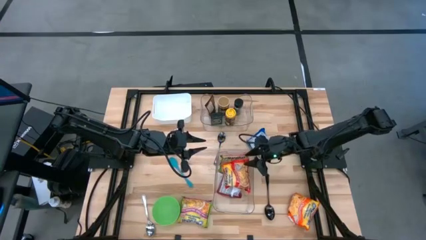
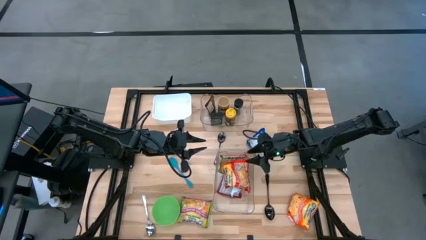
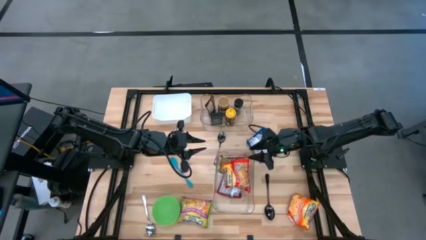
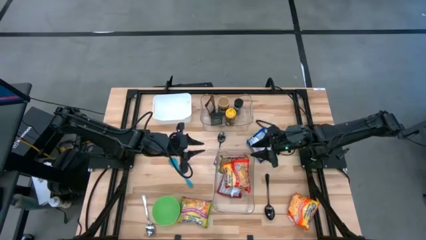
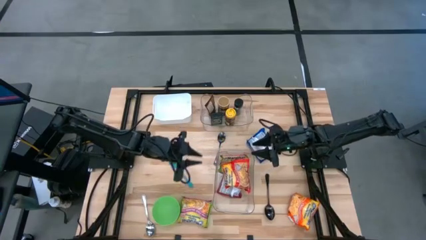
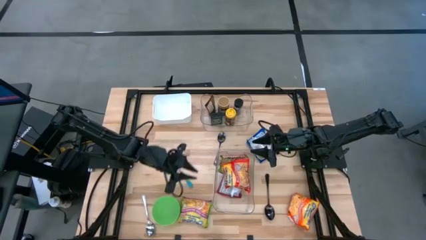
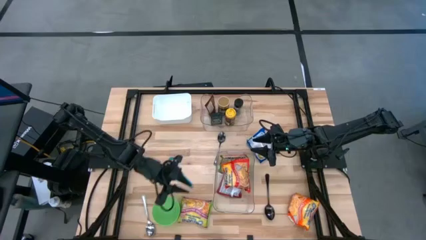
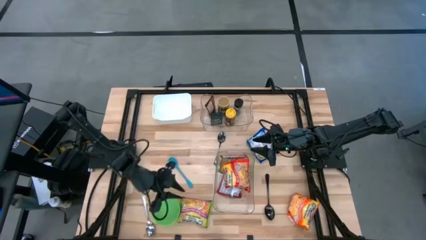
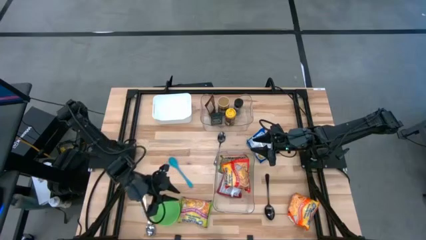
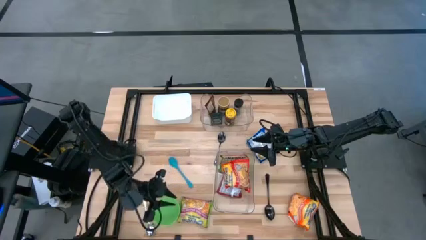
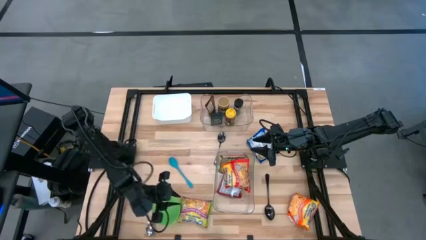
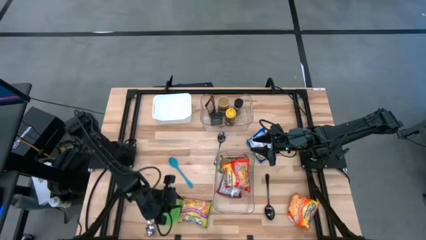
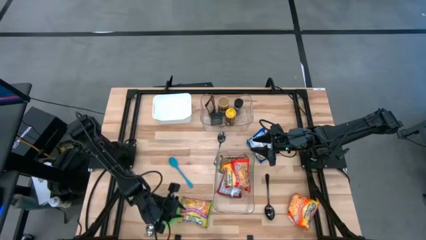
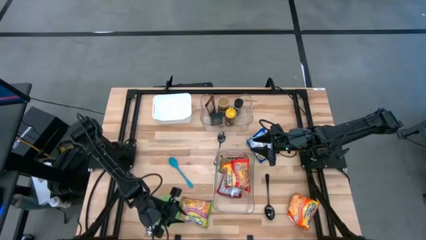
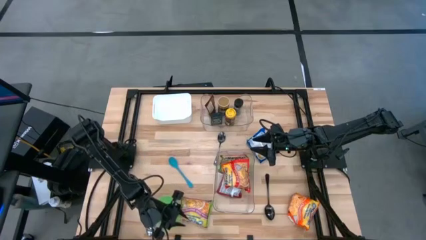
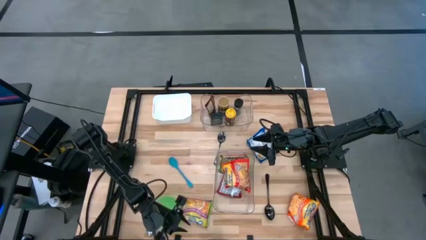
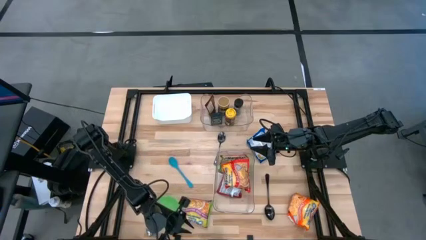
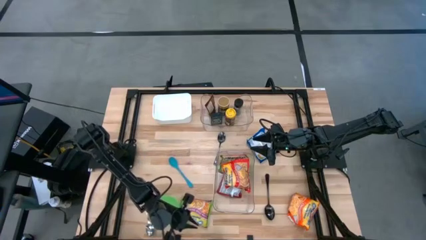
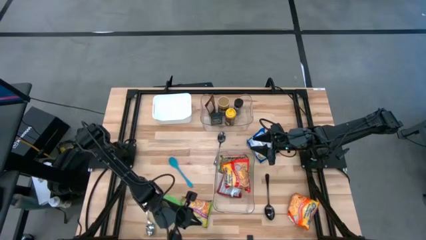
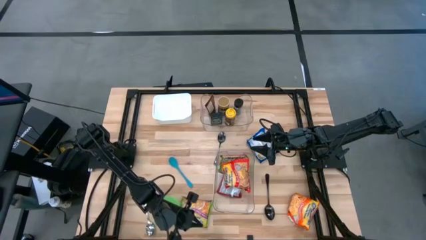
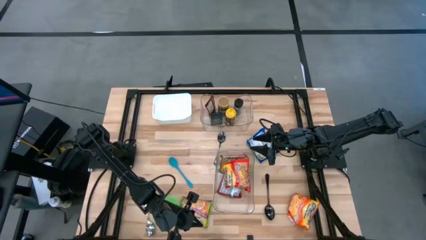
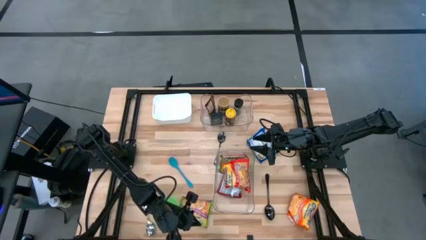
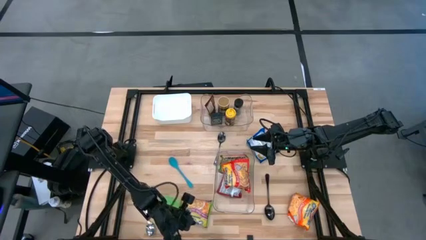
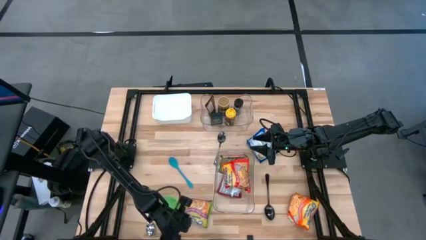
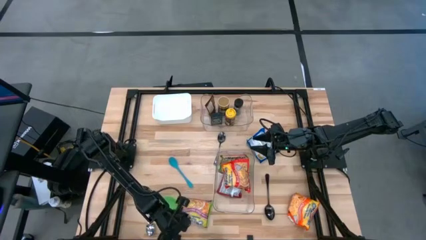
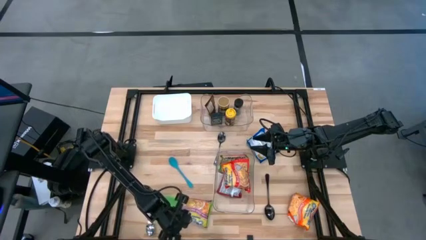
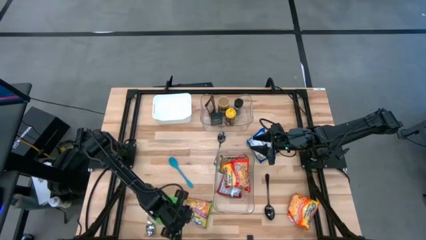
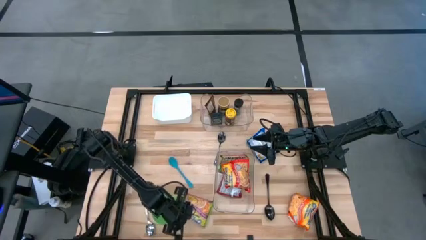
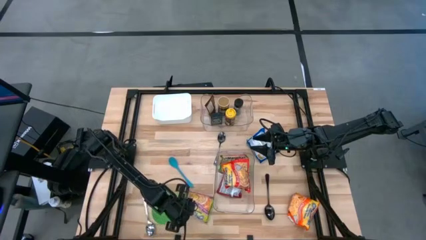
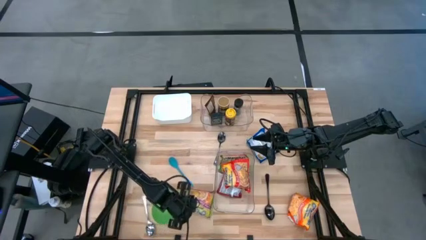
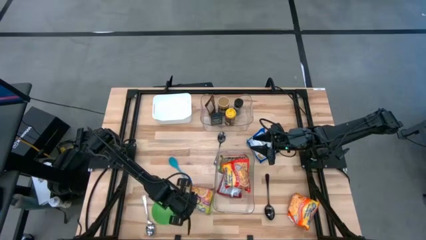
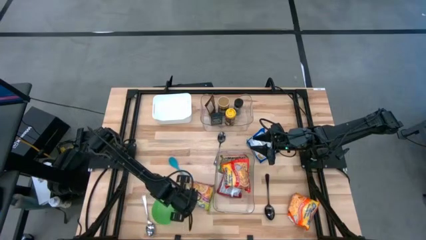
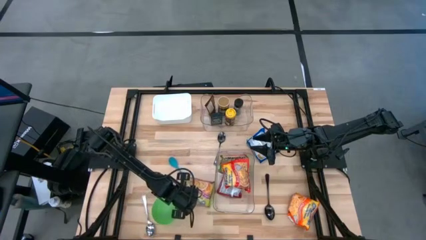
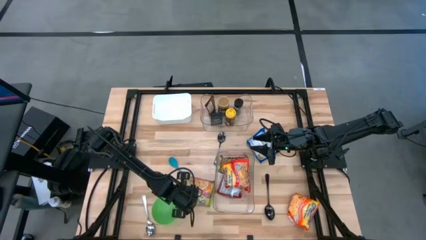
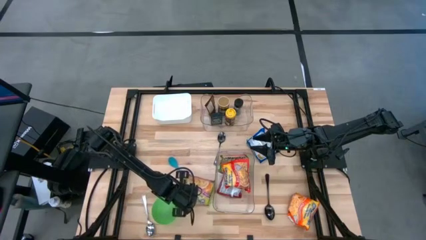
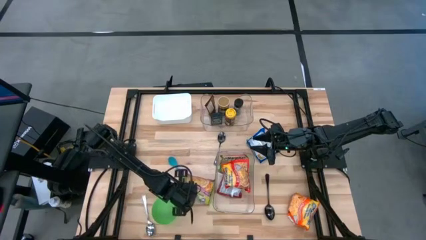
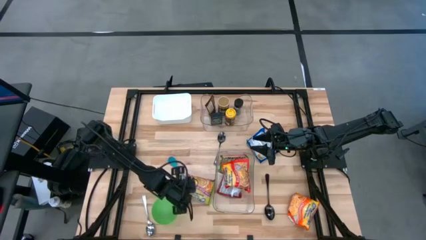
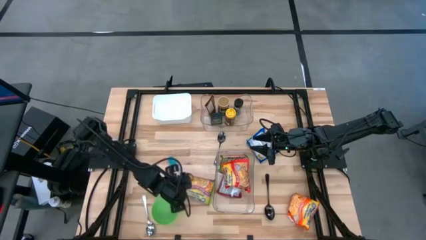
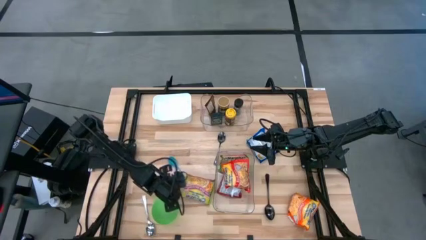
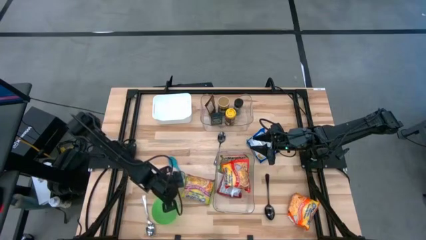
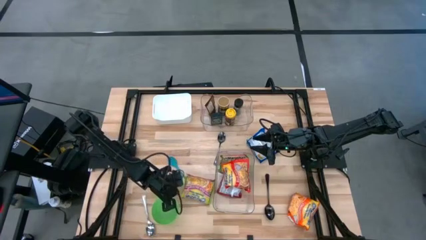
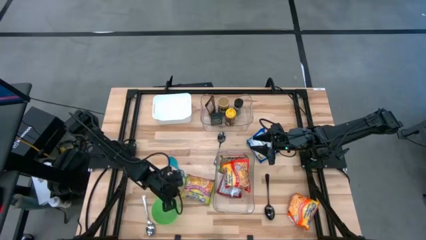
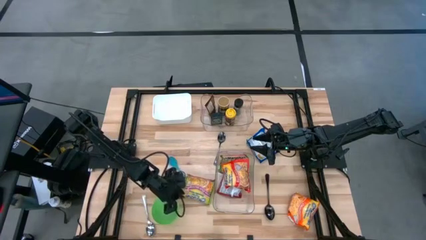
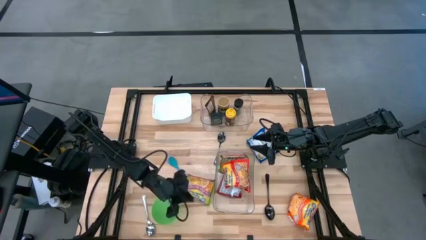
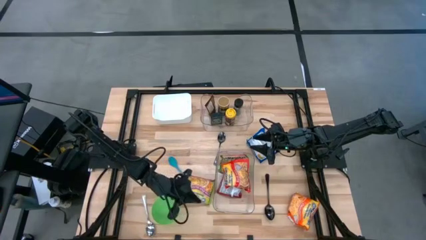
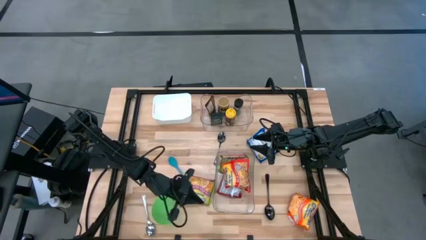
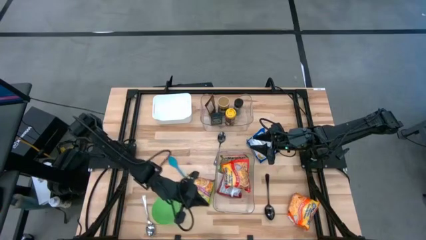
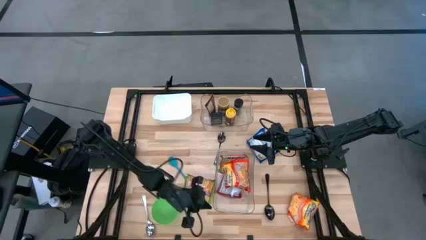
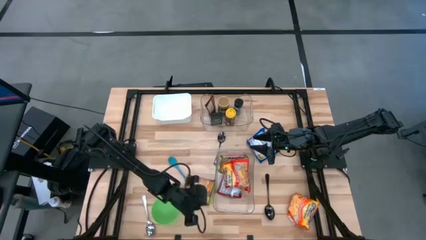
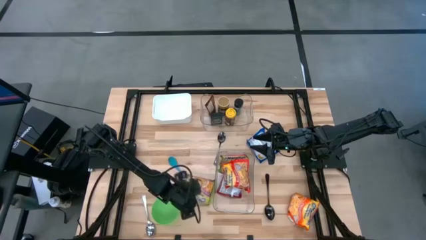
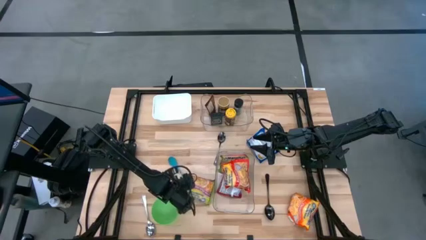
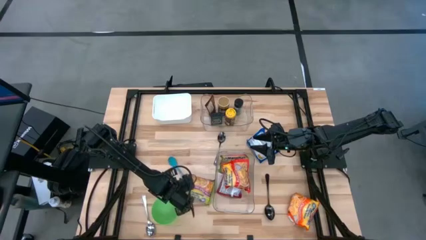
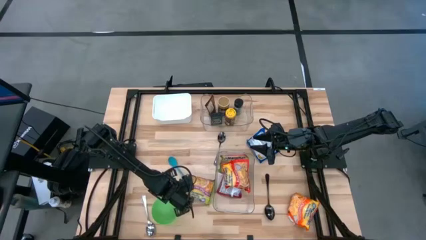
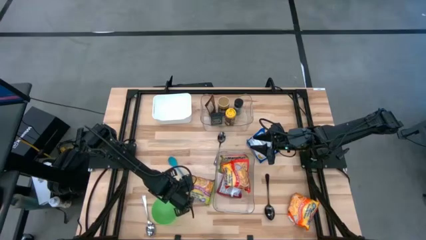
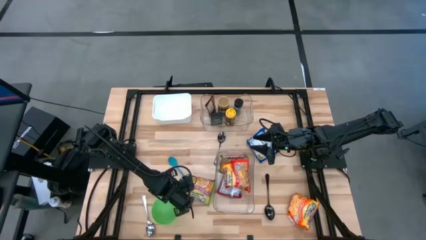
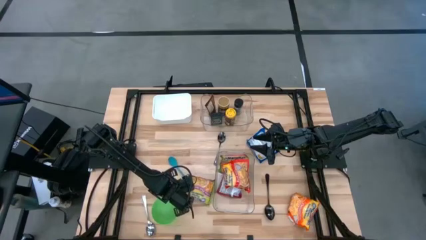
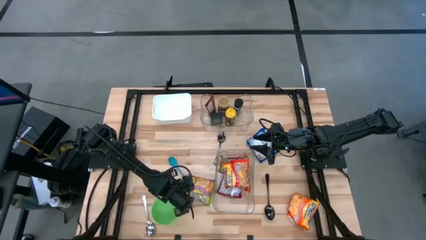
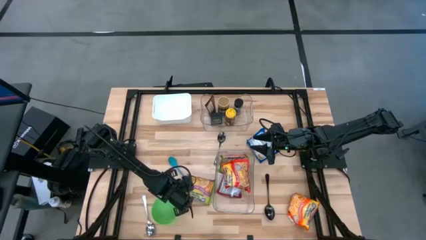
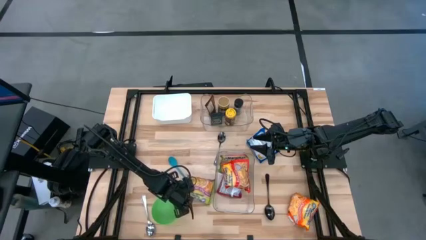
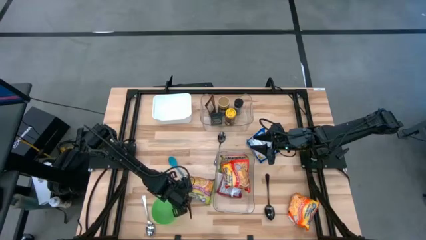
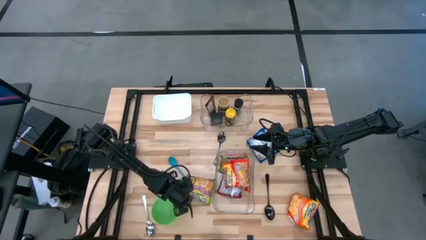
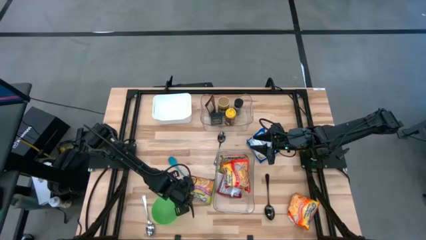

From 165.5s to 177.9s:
Task: Pick & Place Food Item
Put the green noodle pack into the bottom transparent bin
